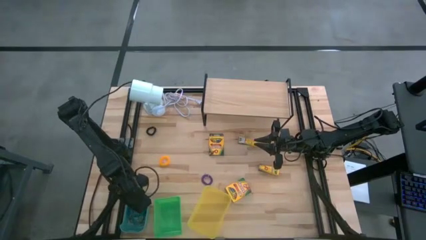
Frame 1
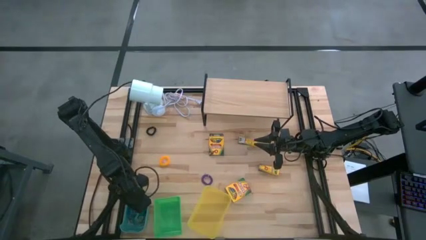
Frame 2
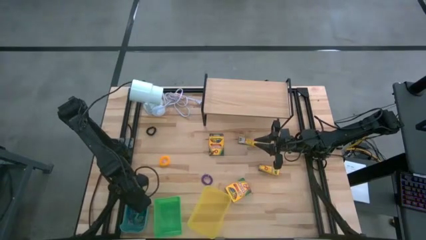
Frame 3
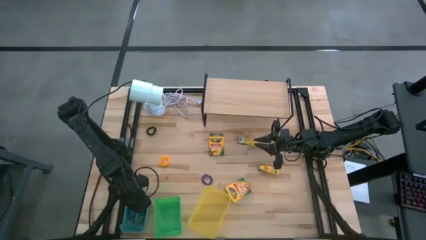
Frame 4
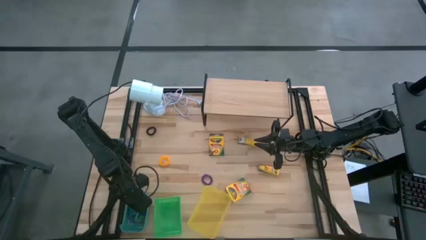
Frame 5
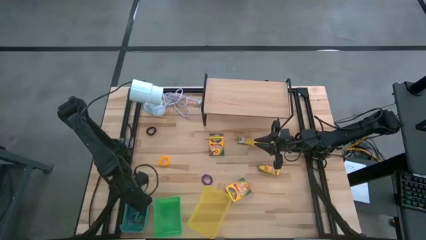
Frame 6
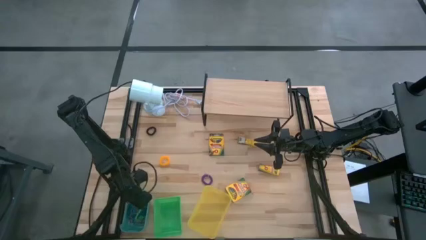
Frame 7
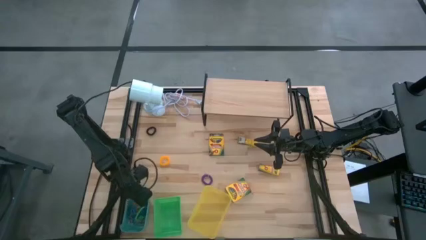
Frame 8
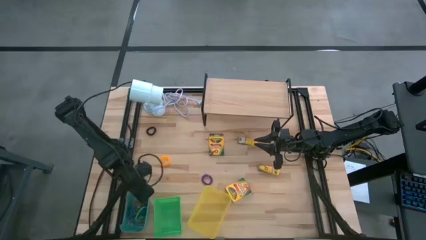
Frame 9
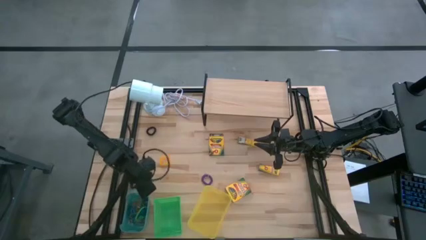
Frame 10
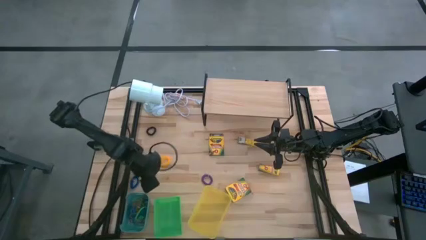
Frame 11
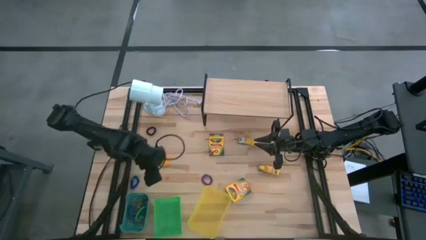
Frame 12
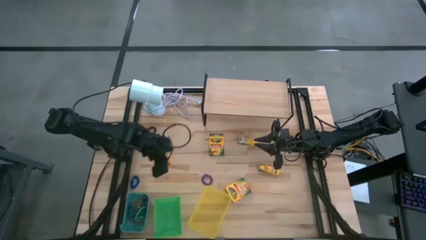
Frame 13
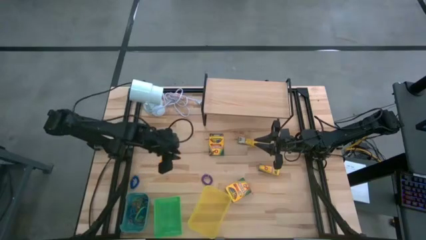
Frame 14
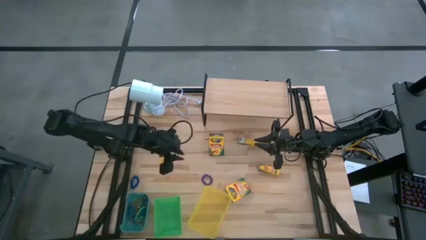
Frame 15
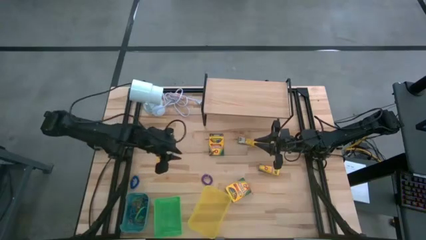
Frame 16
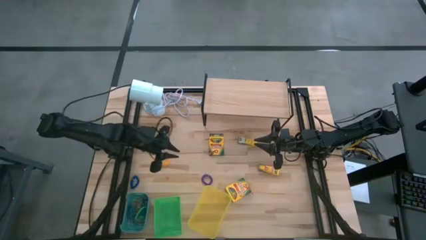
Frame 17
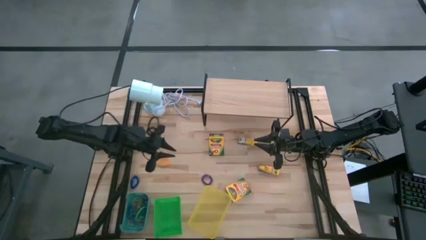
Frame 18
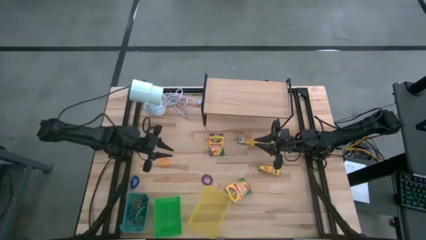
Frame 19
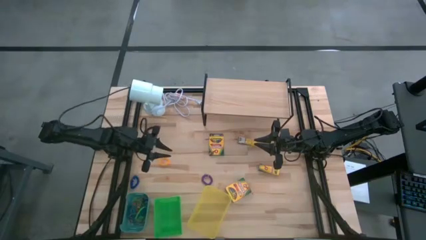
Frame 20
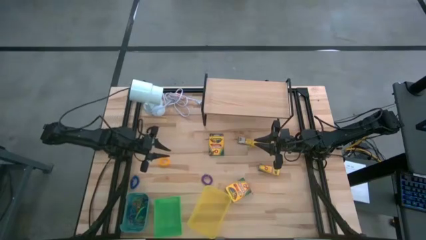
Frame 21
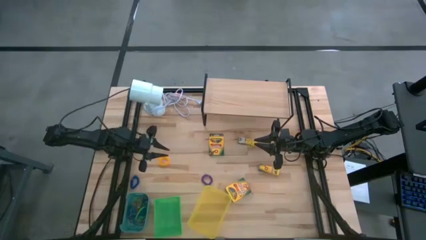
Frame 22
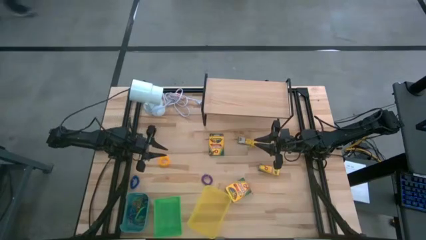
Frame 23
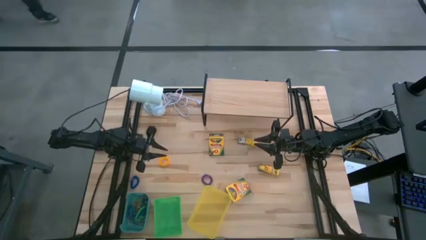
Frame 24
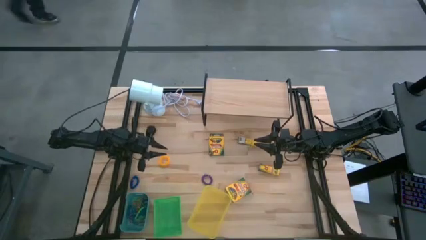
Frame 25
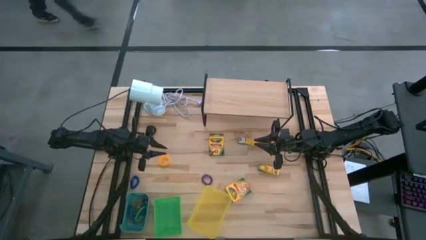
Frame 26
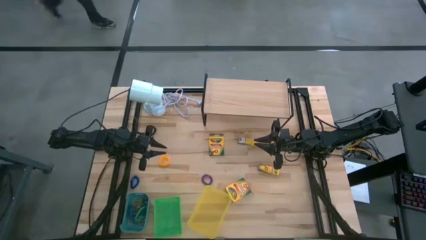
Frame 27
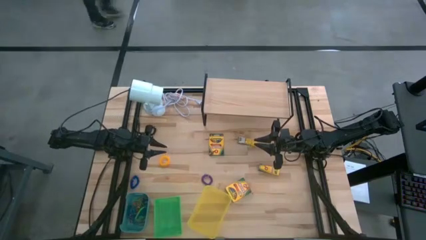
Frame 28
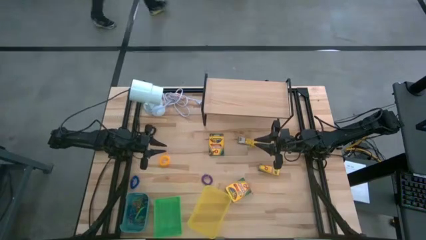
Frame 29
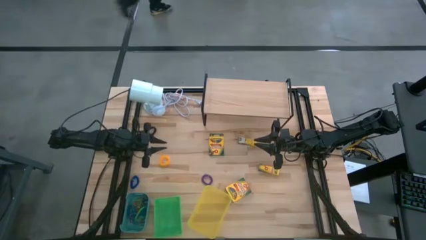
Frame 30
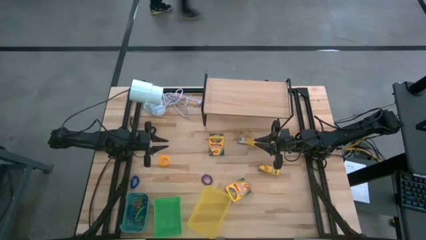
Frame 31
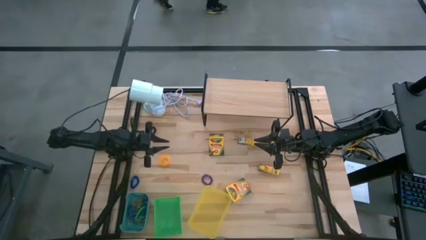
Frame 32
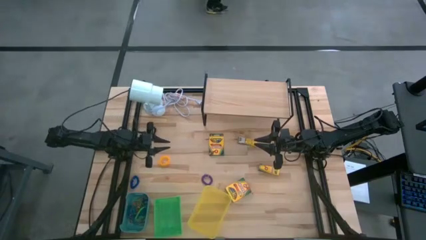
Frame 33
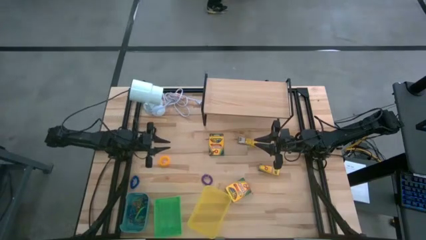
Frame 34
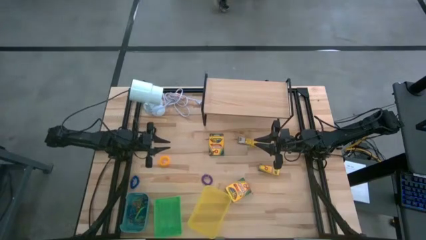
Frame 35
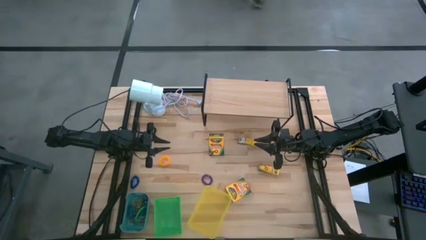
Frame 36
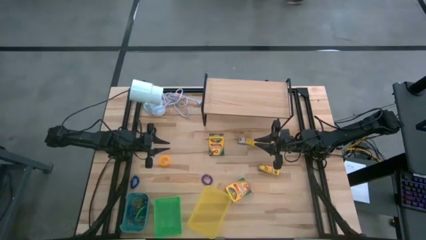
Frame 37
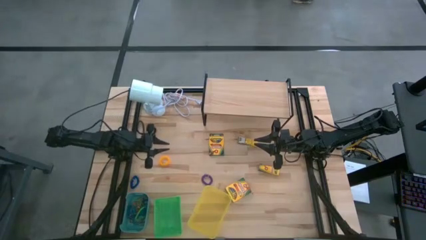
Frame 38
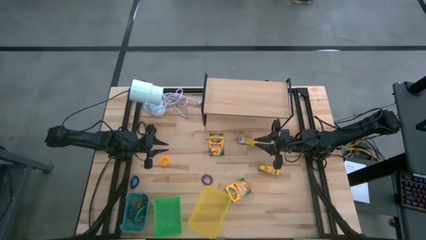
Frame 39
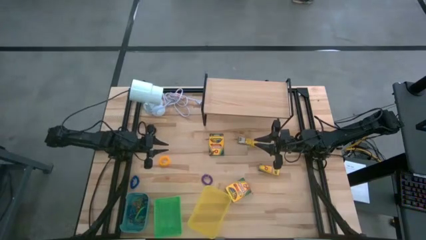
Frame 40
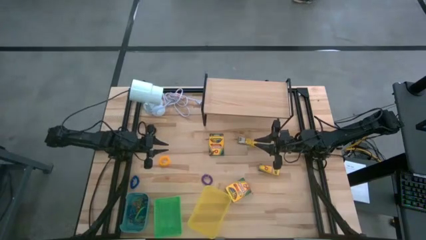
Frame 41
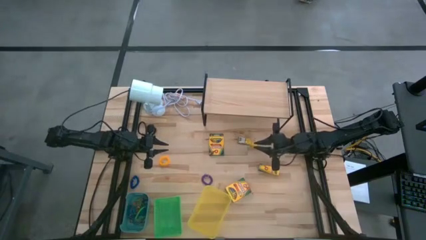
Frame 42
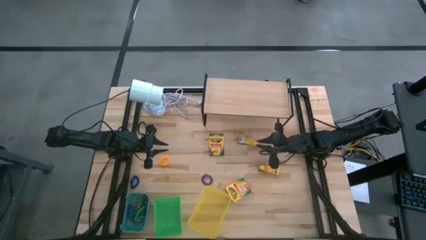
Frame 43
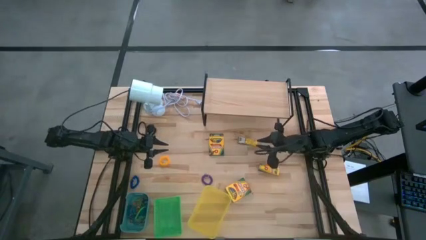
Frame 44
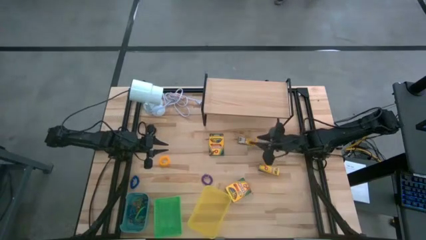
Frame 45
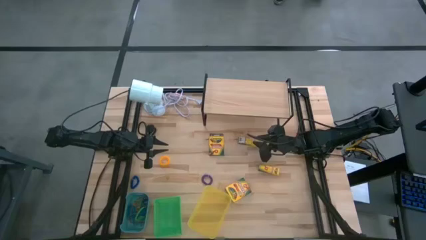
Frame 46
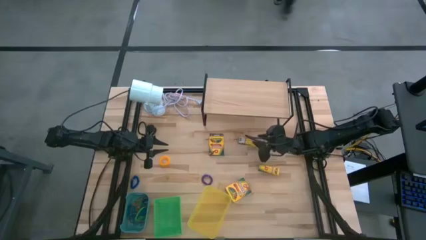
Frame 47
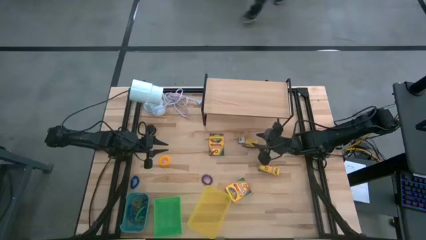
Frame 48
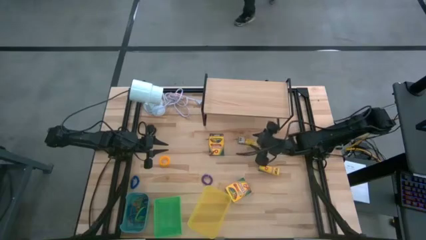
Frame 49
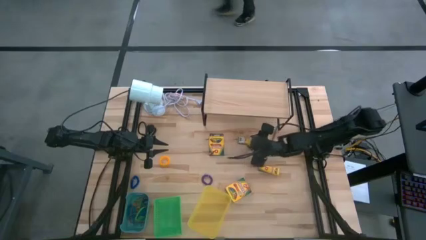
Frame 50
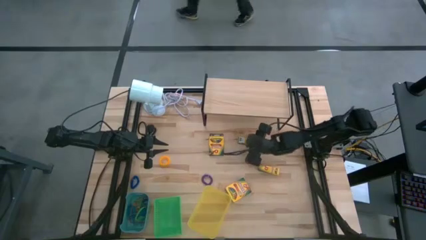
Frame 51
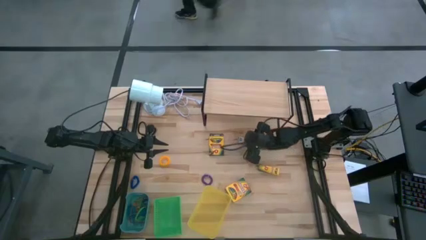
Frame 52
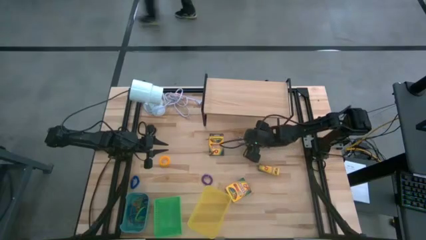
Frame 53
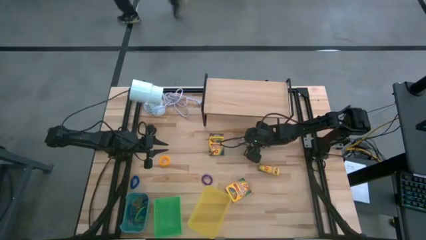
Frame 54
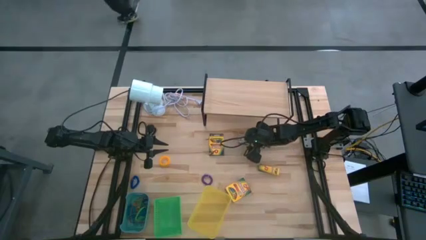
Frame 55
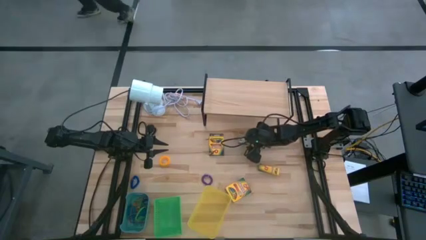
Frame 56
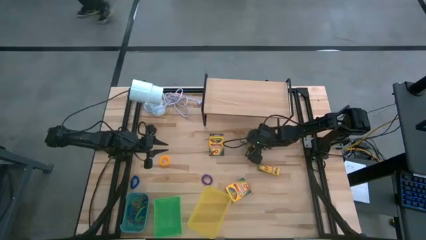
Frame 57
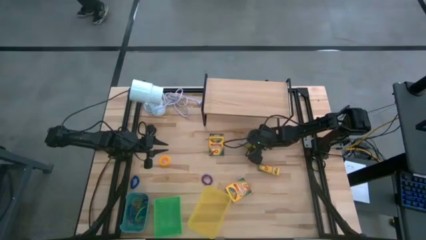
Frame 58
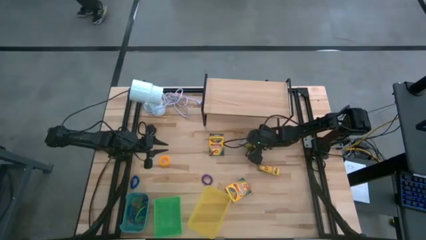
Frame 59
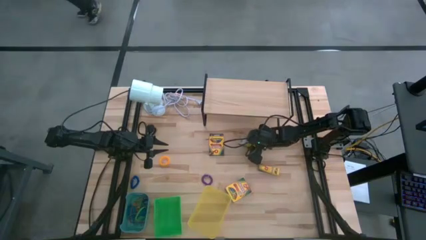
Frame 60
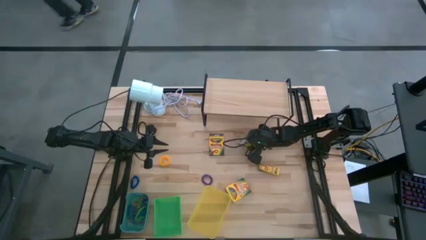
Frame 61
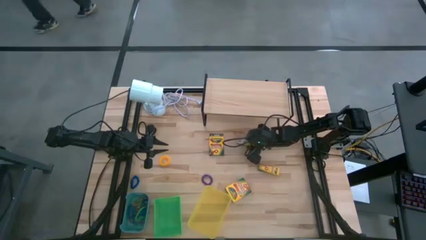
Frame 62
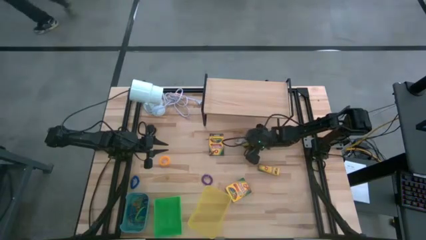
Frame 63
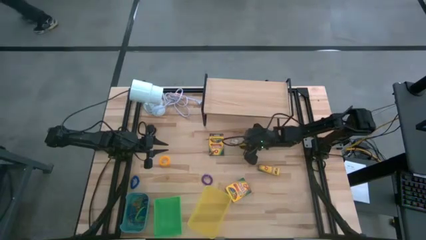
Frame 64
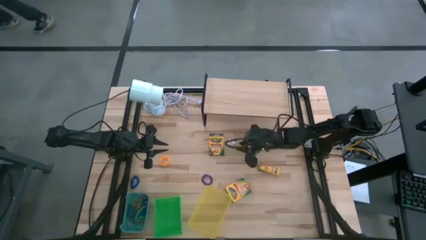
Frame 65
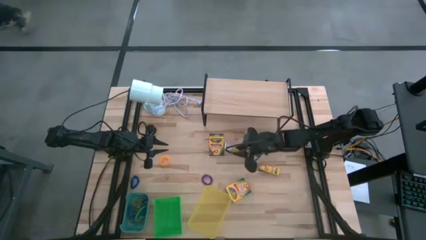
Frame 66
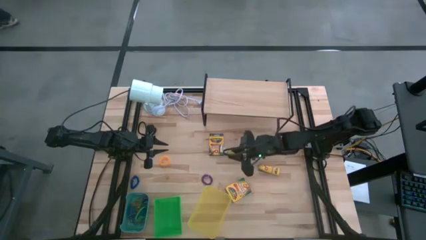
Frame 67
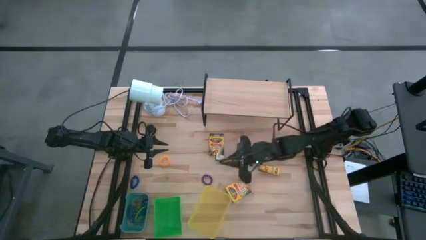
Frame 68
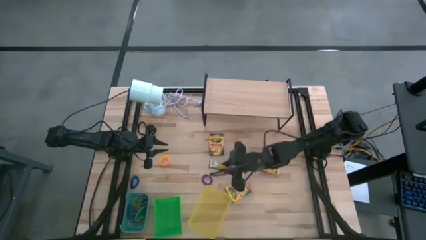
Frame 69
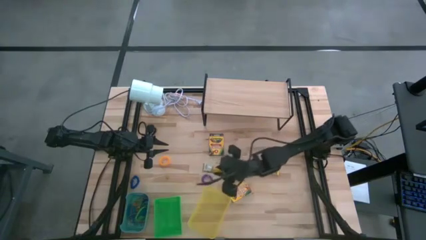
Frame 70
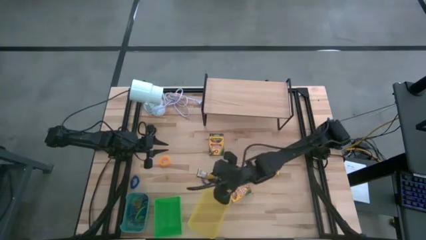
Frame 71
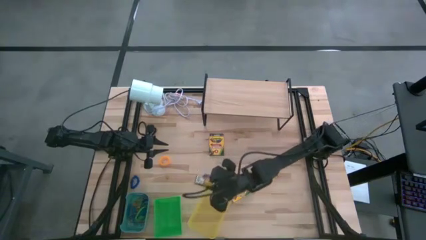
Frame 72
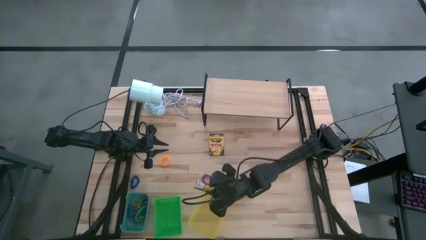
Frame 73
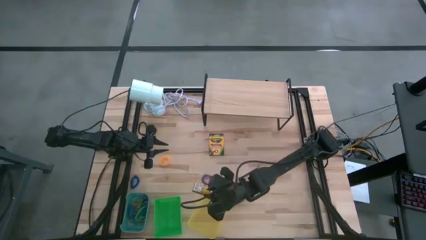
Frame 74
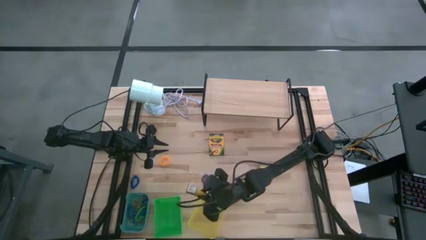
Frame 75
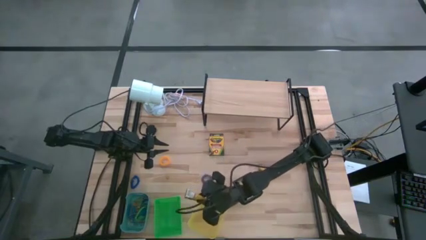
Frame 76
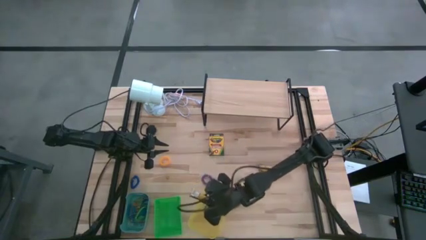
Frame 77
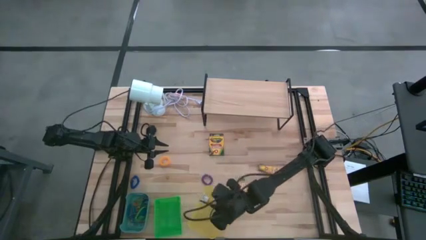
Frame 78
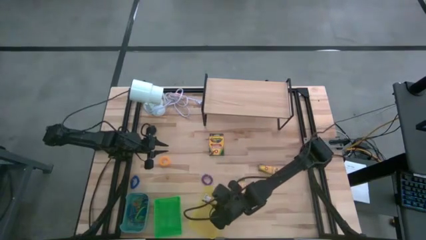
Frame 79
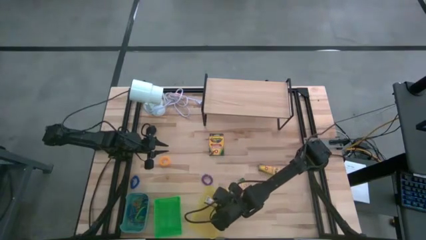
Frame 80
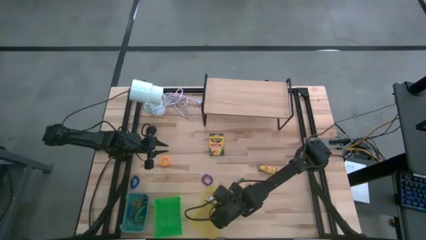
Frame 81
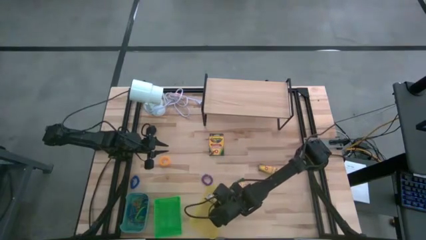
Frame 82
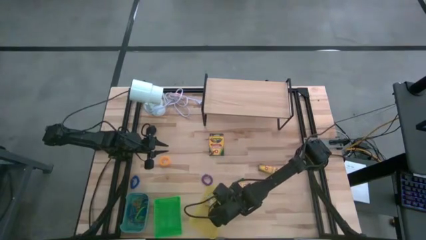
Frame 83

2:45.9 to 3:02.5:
Task: Pick & Place Office Desk Supplies
Put the crayon box into the yellow bin
